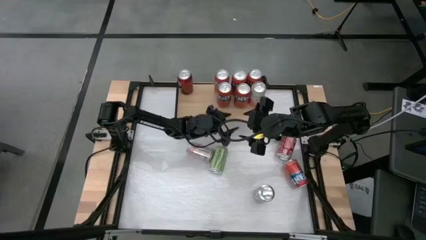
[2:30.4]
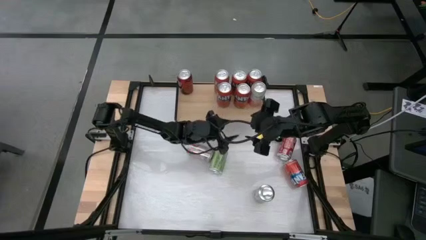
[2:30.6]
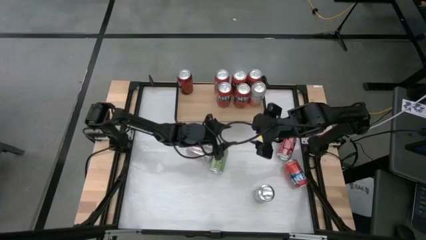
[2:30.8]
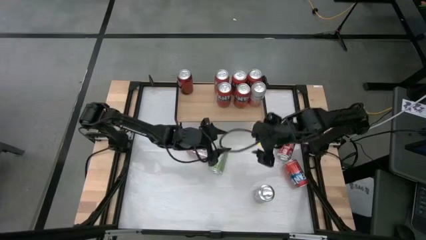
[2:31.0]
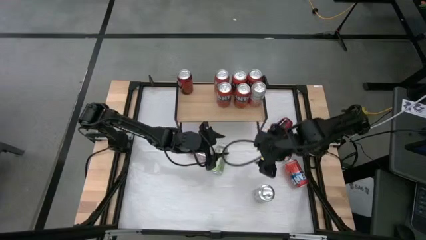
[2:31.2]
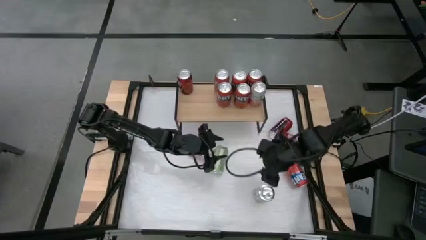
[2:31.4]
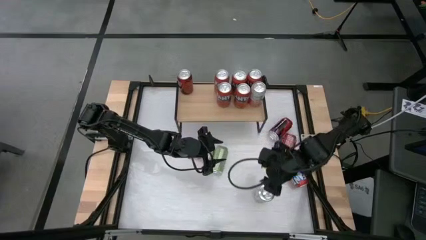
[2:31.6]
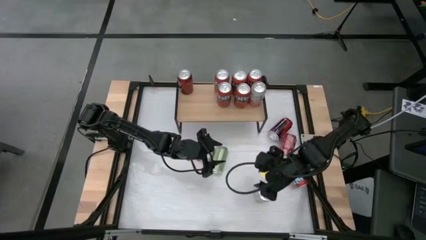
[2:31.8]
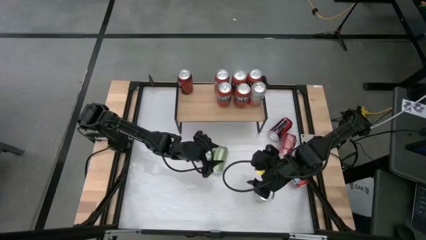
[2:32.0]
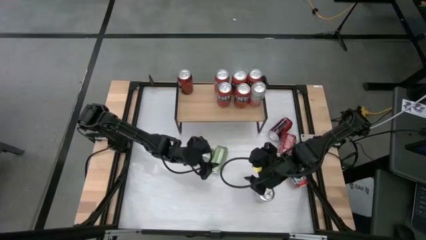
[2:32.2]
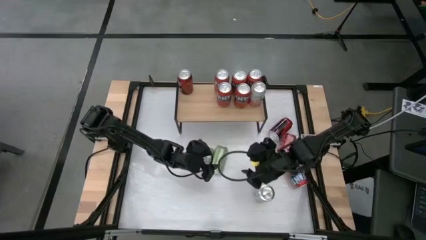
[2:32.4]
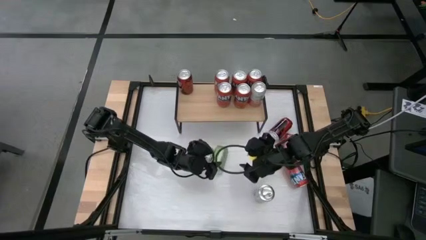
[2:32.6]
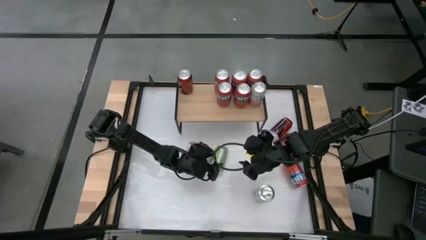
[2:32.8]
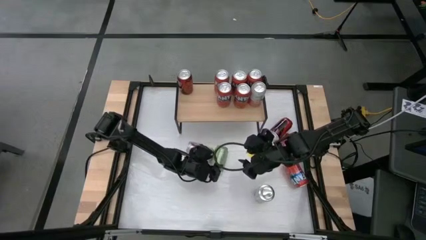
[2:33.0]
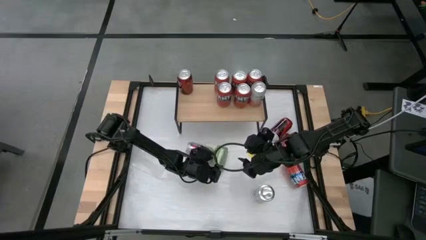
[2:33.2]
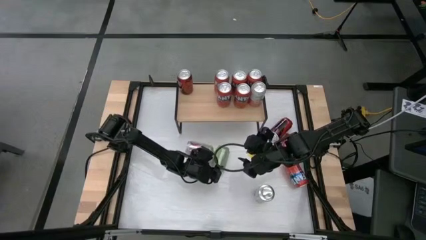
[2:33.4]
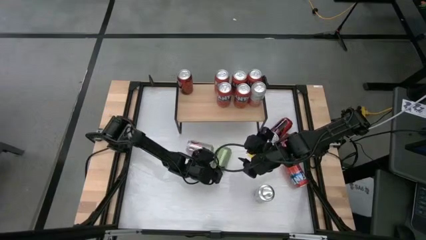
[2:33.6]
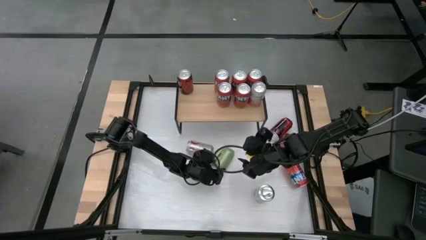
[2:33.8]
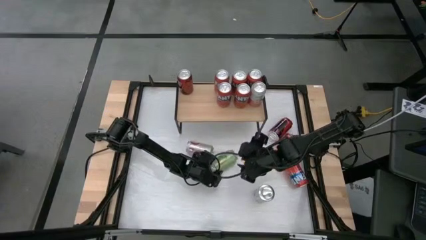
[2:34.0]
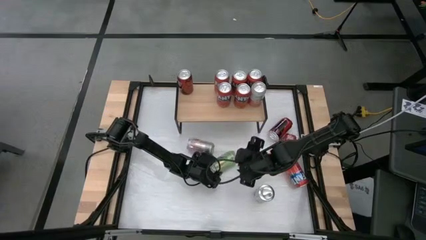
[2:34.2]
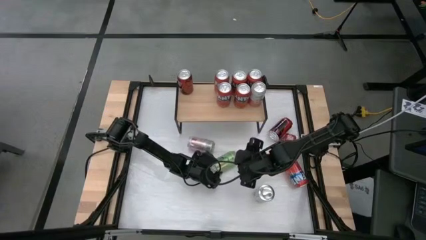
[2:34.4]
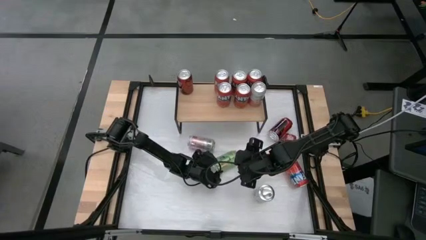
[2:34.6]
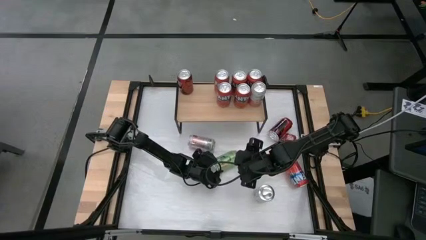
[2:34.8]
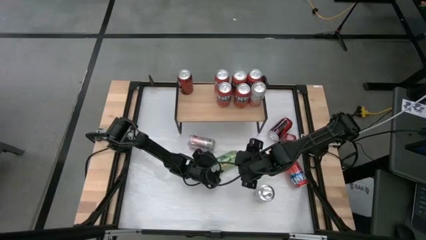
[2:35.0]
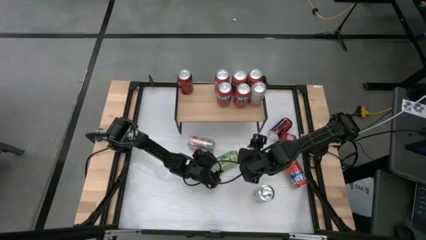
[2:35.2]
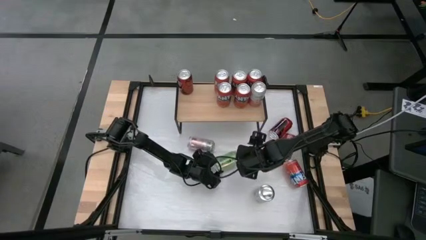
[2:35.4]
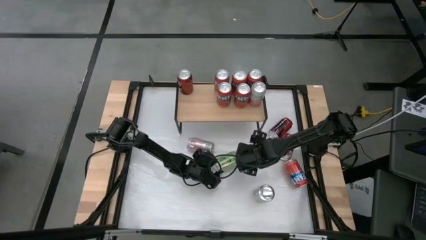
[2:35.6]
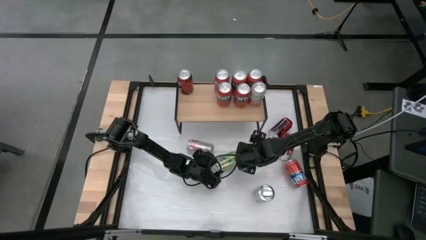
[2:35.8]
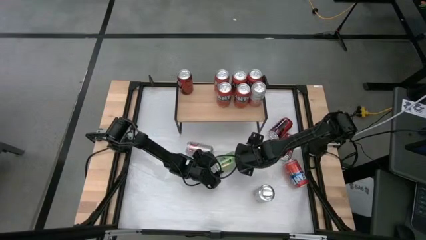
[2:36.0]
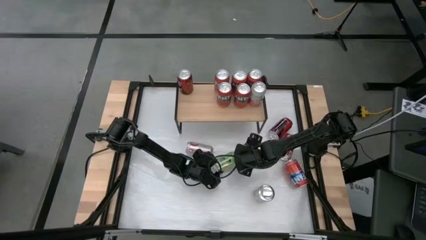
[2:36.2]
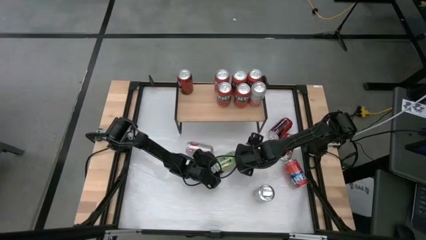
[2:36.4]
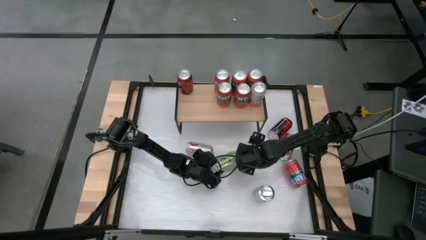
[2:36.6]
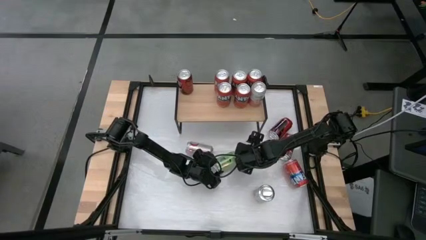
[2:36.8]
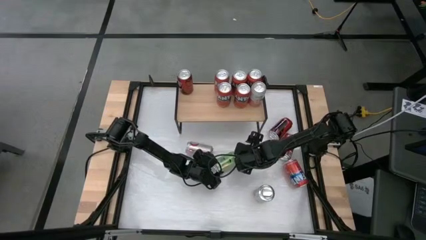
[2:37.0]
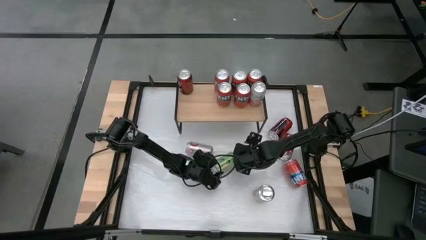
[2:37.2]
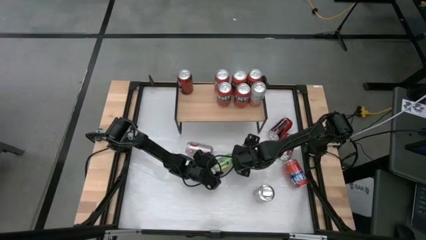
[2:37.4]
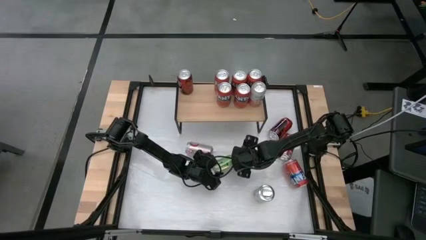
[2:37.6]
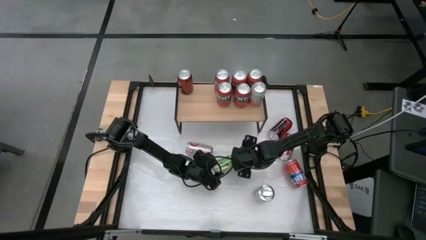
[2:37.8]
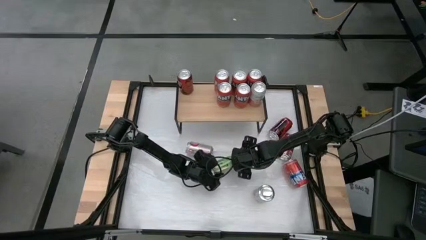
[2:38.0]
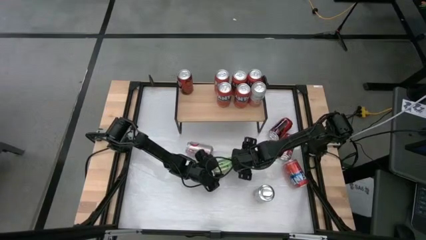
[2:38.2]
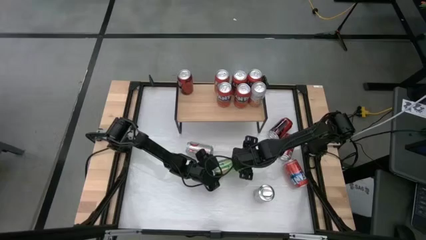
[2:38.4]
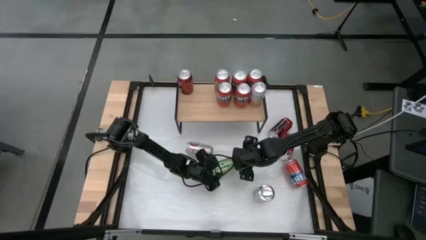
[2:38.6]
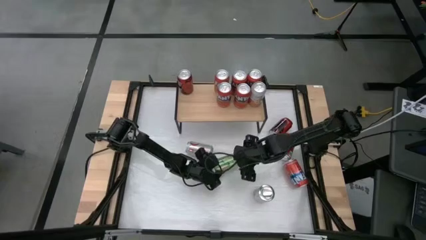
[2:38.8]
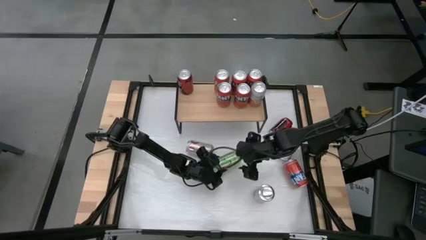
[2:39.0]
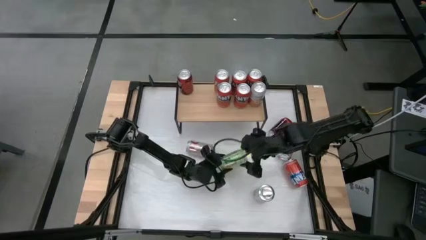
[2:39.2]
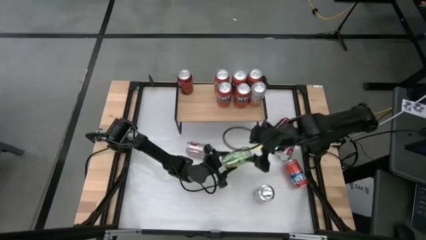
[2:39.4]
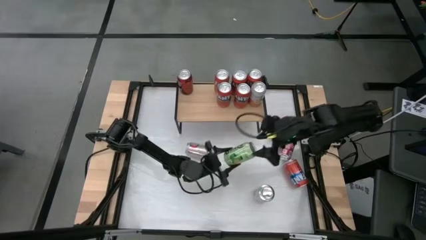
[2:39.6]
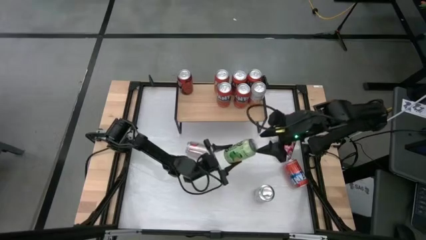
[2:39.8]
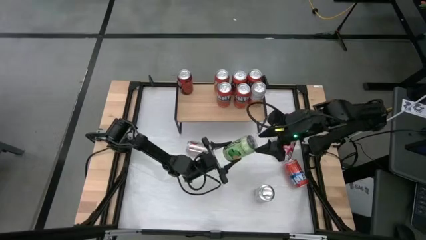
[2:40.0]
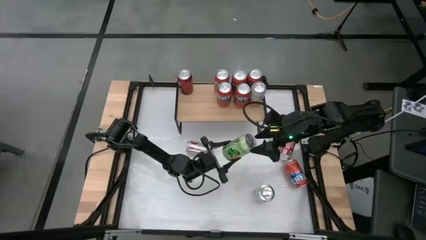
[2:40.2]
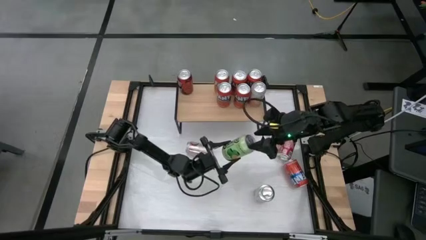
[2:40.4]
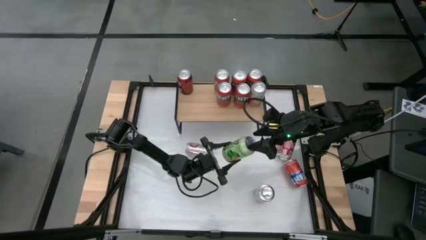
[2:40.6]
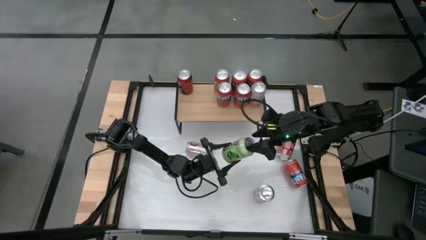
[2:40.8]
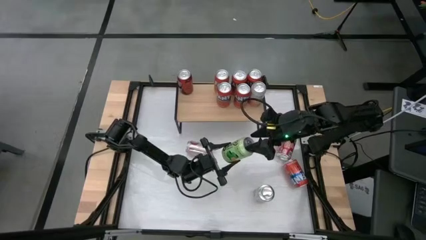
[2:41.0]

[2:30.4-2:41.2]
Task: Place canned beverage on shelf
Put the green soda can on the shelf

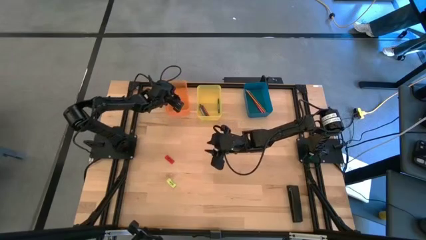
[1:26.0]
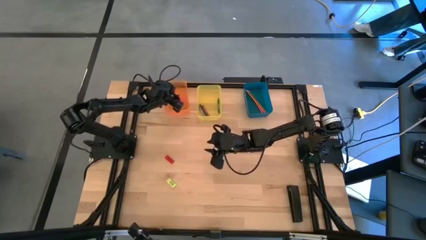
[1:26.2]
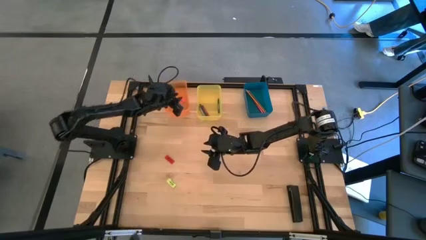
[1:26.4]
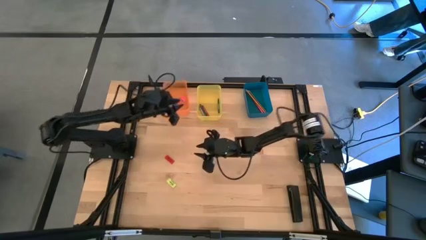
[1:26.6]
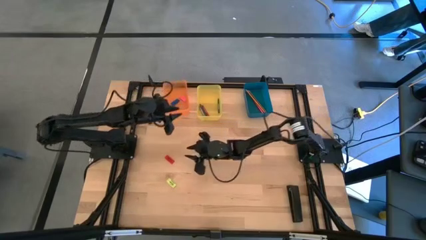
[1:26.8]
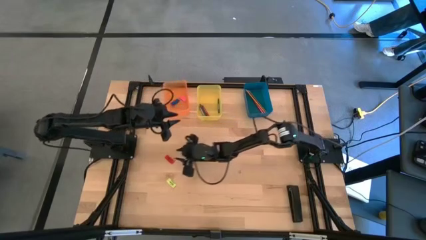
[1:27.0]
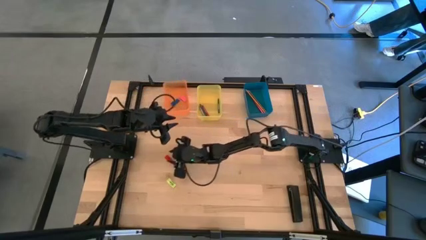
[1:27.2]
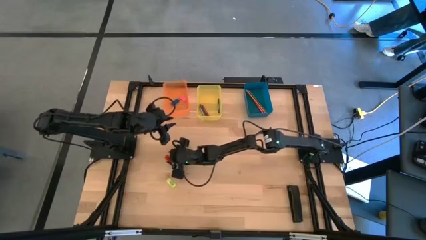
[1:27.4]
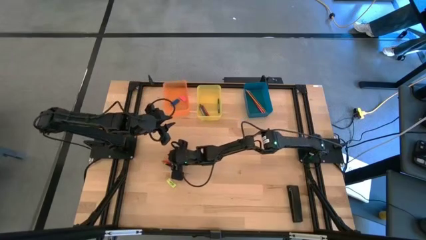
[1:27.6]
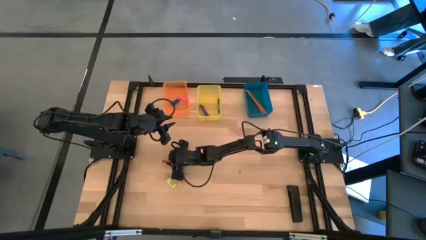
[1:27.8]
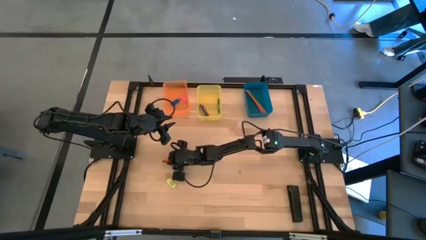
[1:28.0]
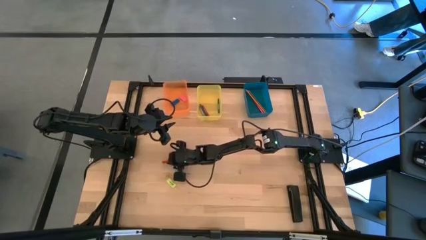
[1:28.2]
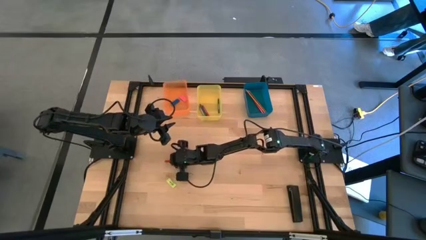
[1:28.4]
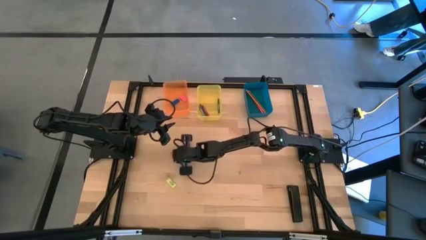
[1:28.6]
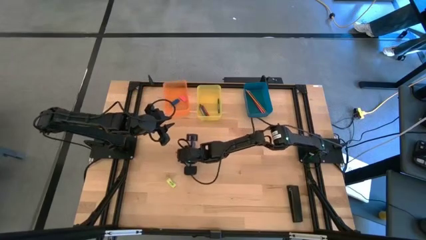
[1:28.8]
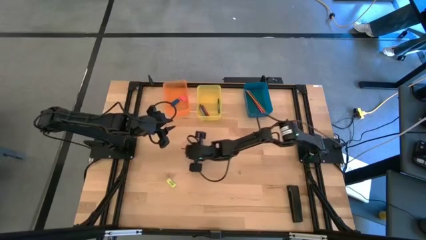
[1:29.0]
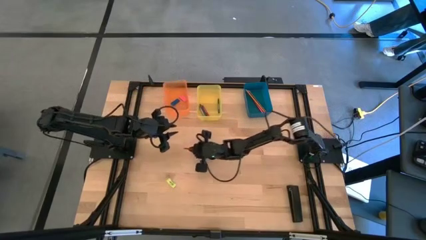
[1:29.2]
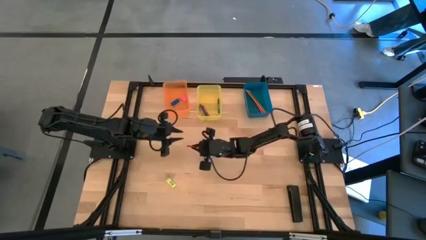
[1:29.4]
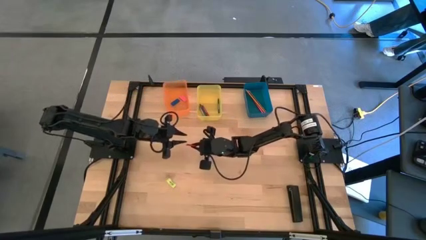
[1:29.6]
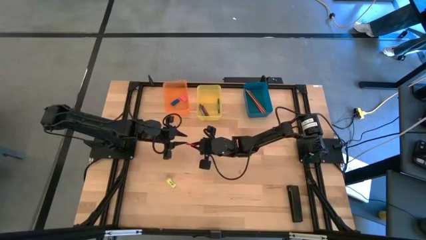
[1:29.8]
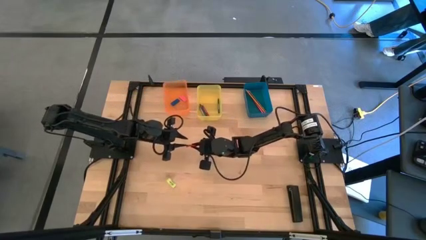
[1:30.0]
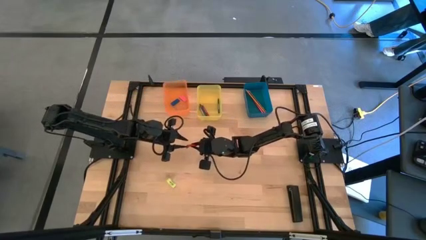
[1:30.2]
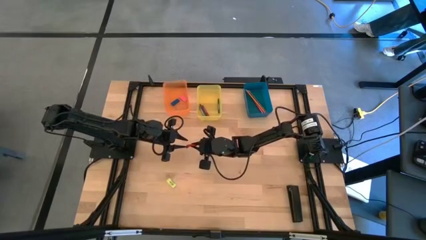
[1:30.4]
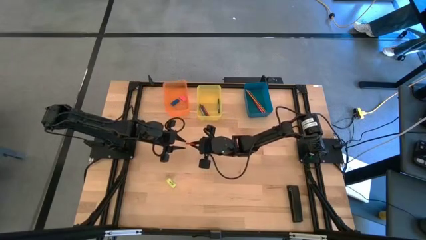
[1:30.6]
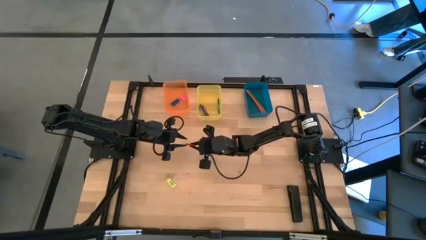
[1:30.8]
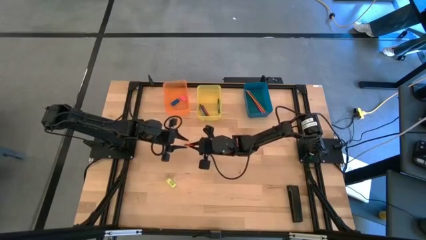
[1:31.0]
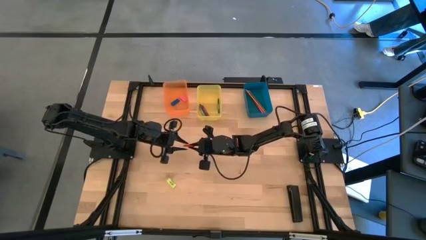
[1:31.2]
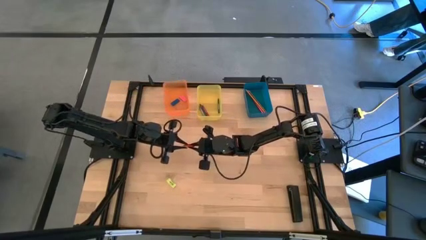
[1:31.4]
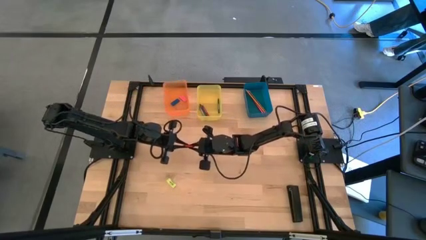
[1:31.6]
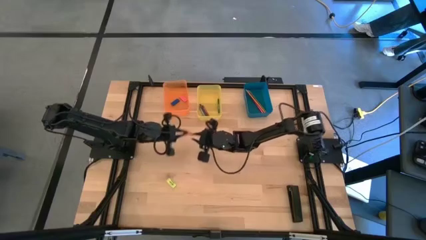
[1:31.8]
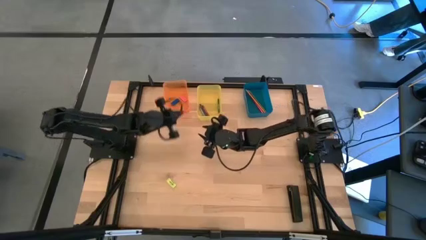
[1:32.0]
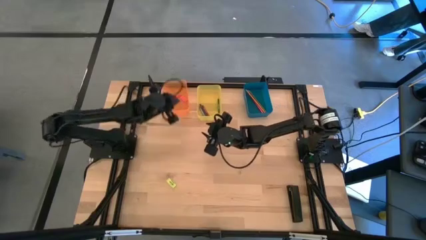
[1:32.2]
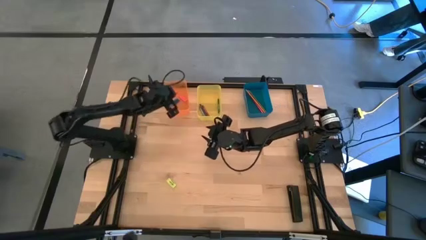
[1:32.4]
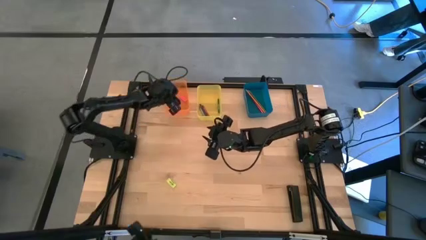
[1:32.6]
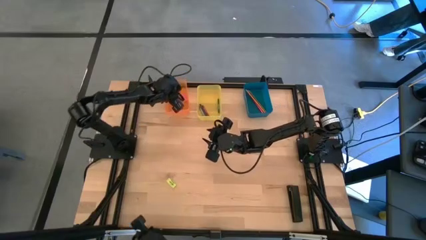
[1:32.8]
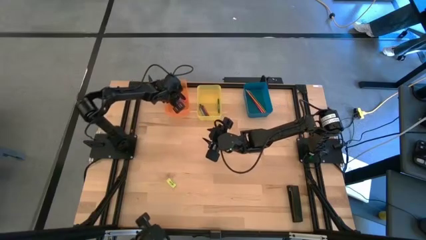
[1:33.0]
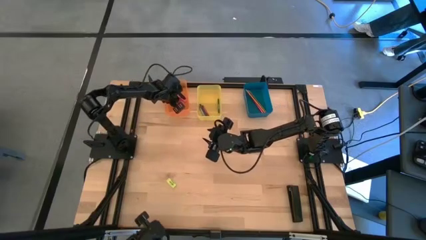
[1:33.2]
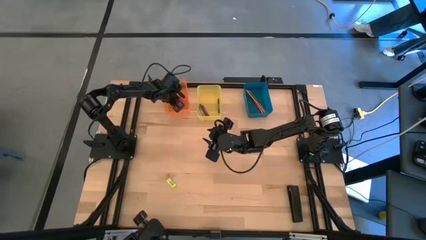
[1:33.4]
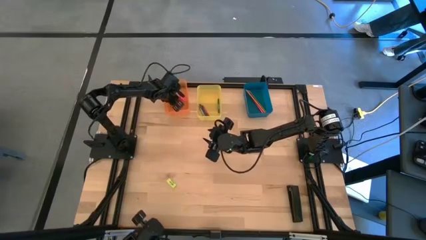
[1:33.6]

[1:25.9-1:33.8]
Task: Sort crayons/erasers/pens/pencils in bins
Put the red eraser into the orange bin
